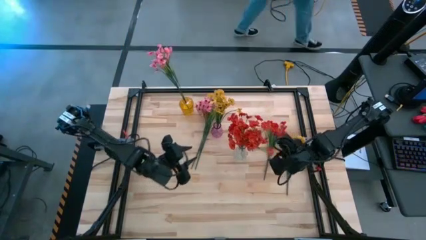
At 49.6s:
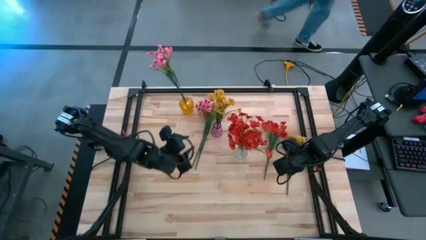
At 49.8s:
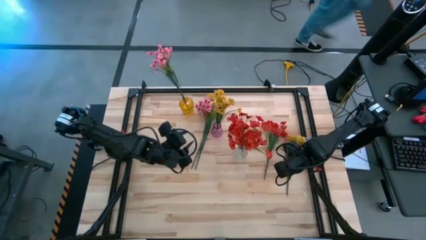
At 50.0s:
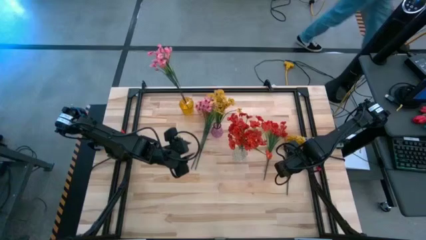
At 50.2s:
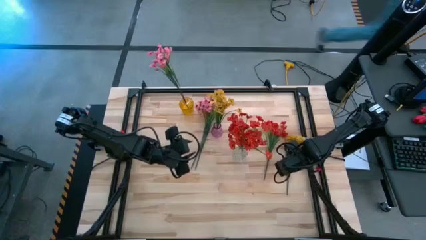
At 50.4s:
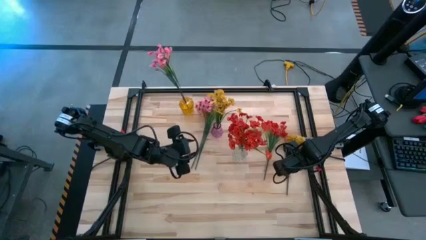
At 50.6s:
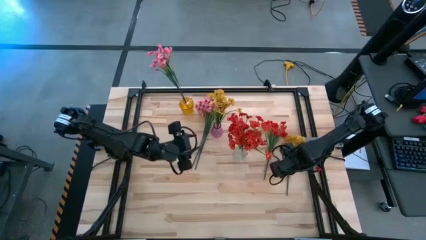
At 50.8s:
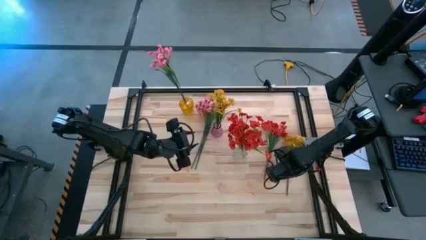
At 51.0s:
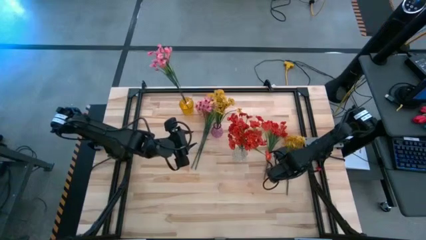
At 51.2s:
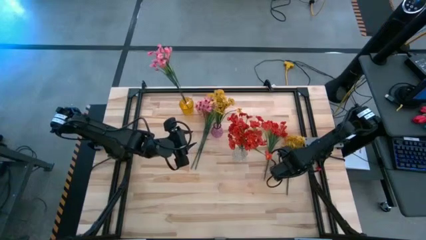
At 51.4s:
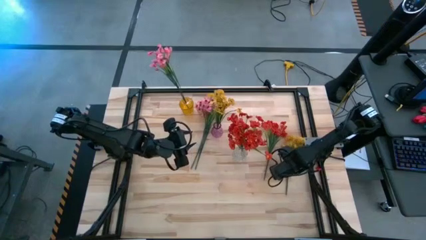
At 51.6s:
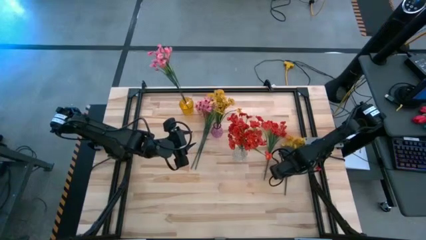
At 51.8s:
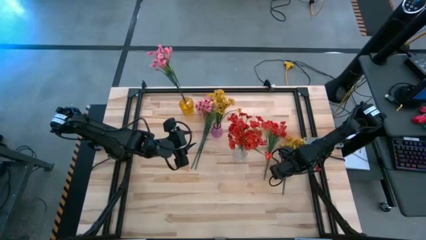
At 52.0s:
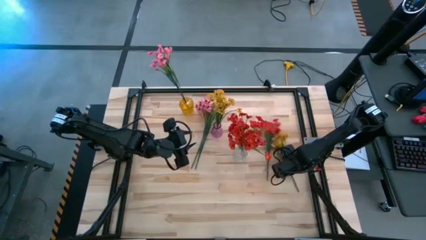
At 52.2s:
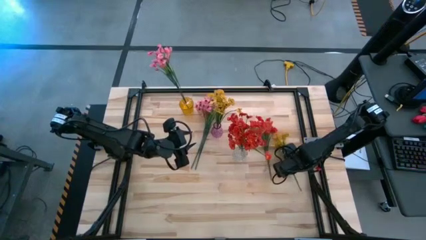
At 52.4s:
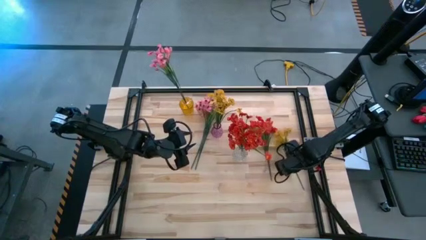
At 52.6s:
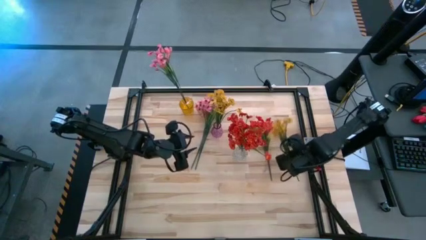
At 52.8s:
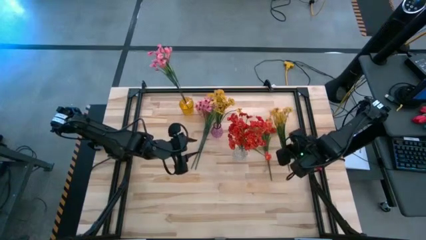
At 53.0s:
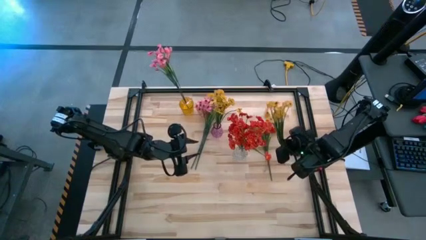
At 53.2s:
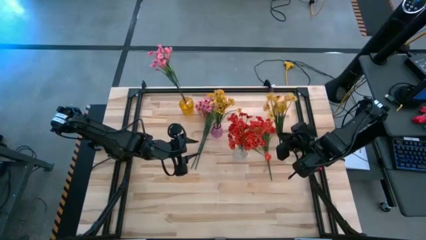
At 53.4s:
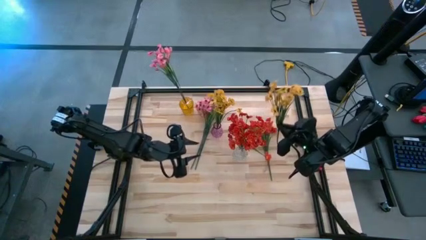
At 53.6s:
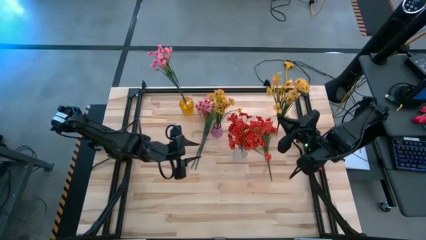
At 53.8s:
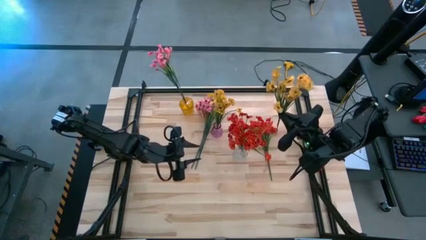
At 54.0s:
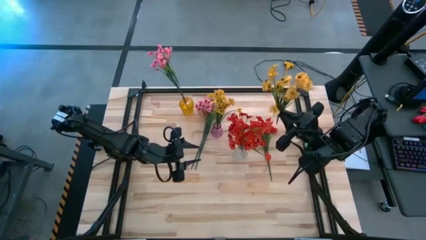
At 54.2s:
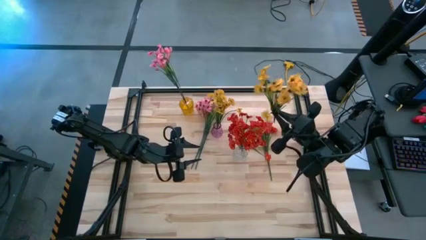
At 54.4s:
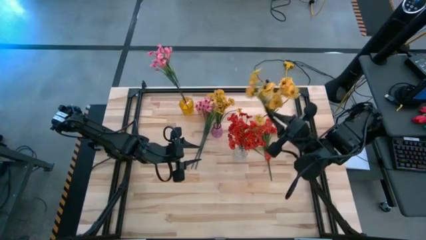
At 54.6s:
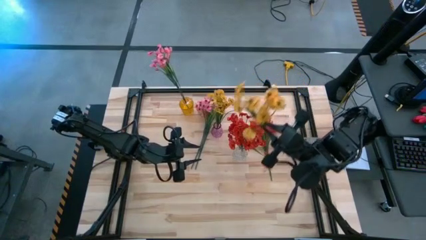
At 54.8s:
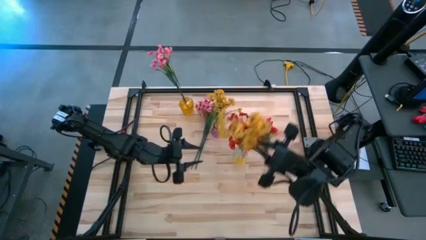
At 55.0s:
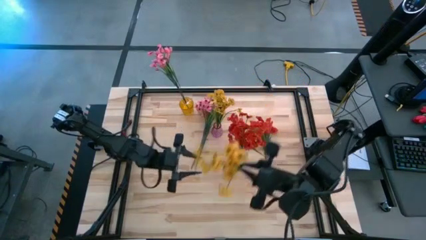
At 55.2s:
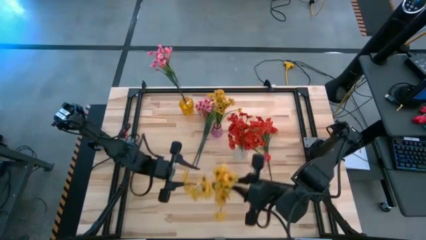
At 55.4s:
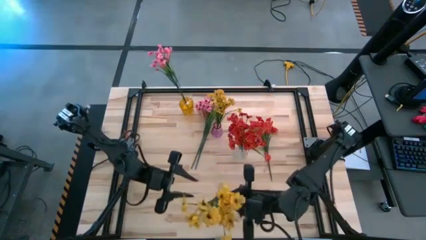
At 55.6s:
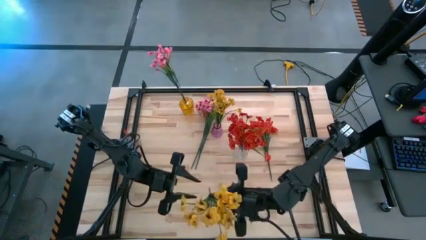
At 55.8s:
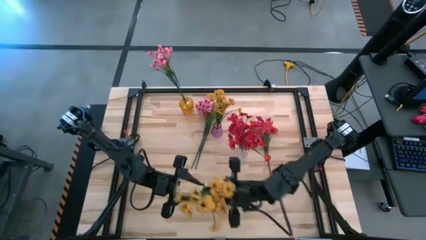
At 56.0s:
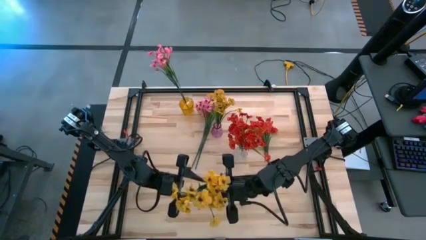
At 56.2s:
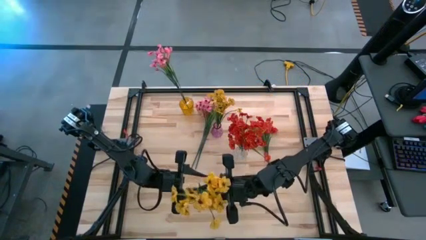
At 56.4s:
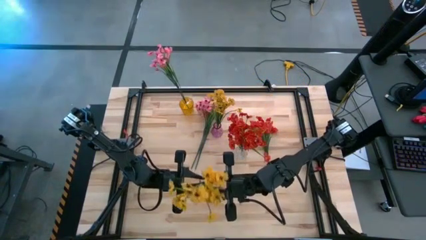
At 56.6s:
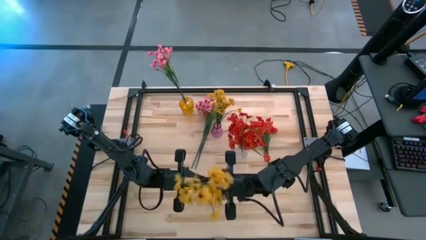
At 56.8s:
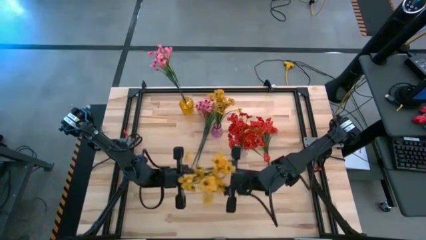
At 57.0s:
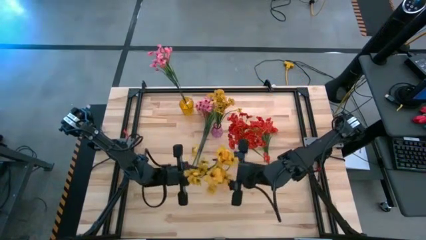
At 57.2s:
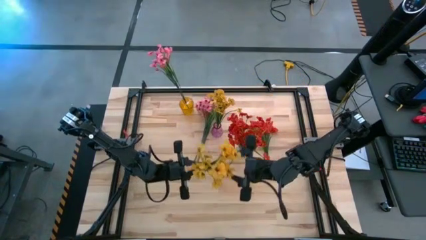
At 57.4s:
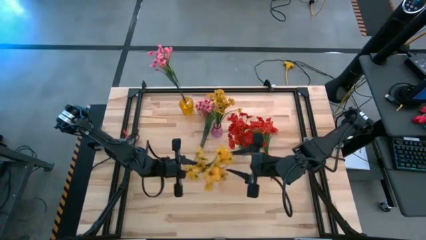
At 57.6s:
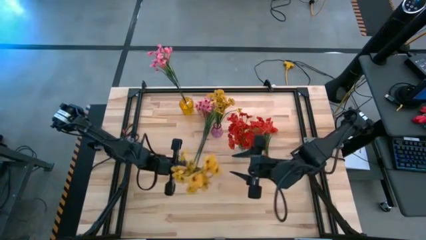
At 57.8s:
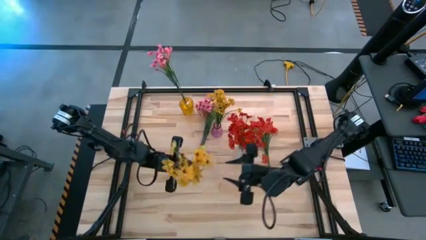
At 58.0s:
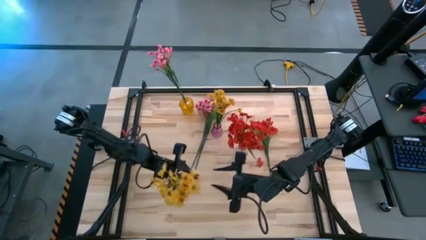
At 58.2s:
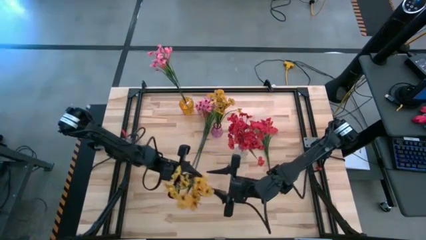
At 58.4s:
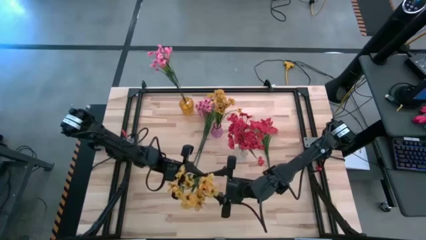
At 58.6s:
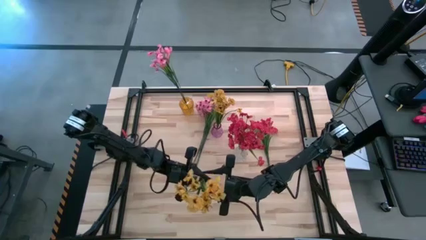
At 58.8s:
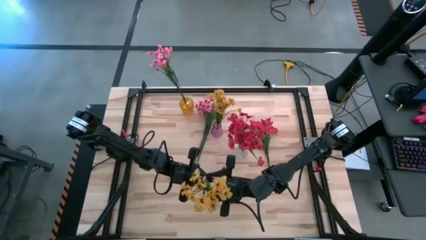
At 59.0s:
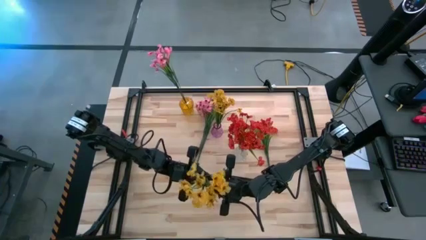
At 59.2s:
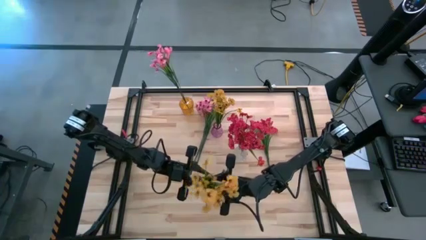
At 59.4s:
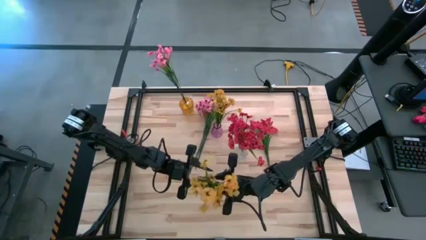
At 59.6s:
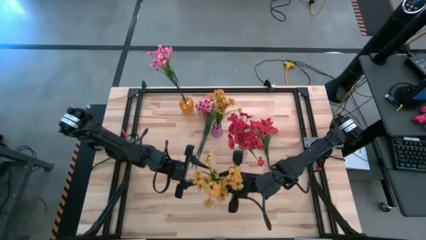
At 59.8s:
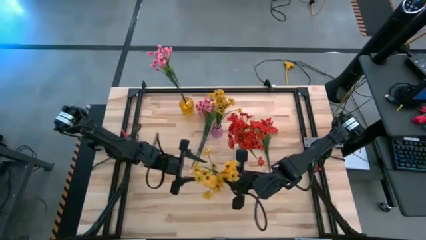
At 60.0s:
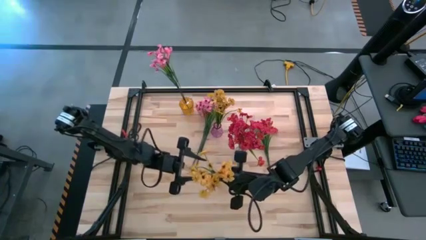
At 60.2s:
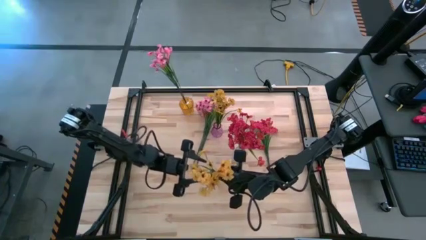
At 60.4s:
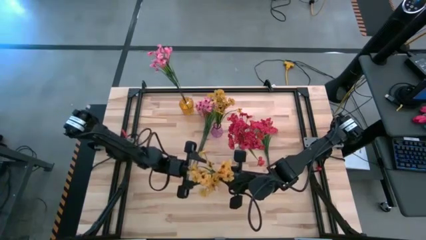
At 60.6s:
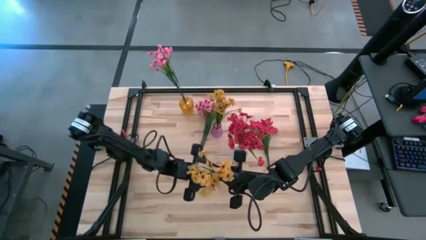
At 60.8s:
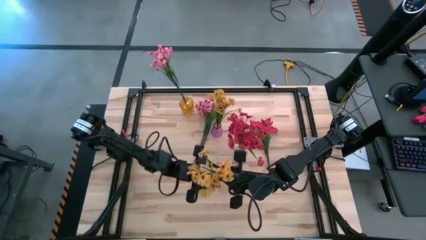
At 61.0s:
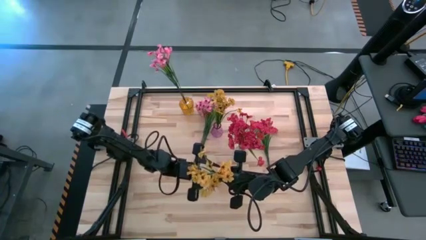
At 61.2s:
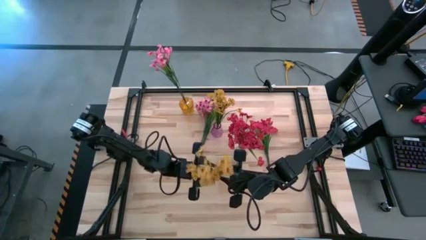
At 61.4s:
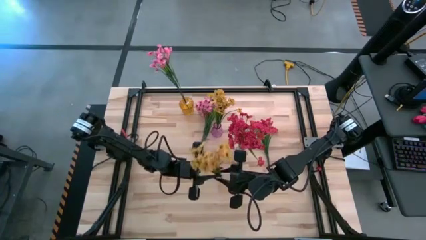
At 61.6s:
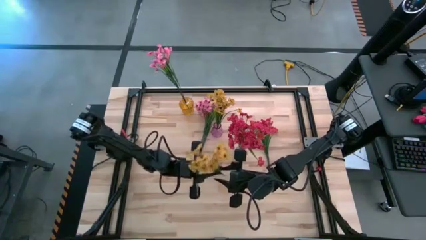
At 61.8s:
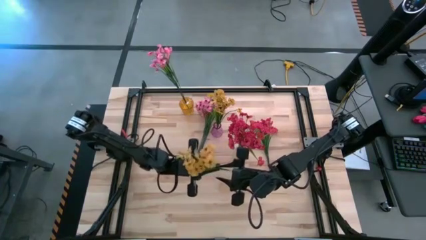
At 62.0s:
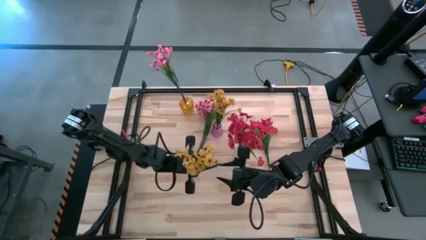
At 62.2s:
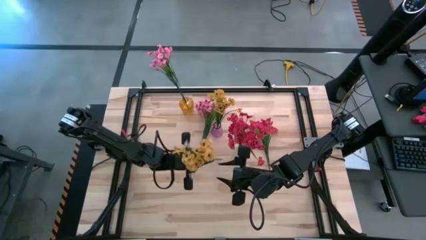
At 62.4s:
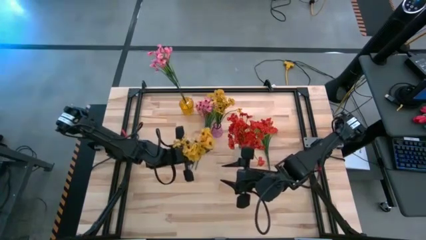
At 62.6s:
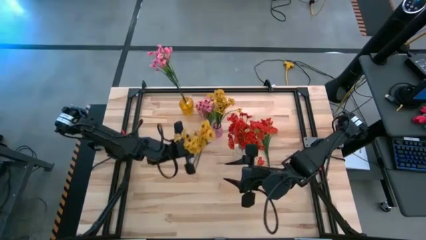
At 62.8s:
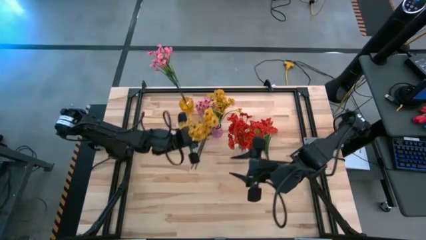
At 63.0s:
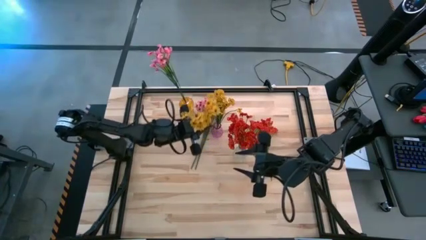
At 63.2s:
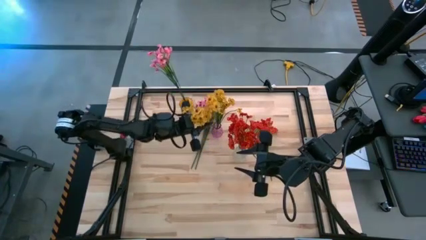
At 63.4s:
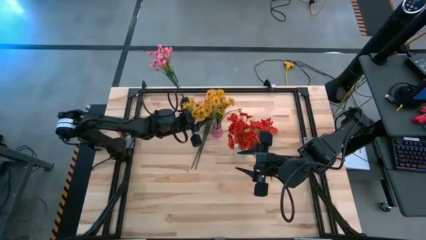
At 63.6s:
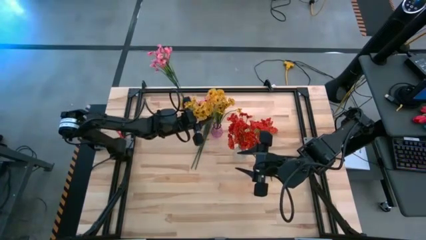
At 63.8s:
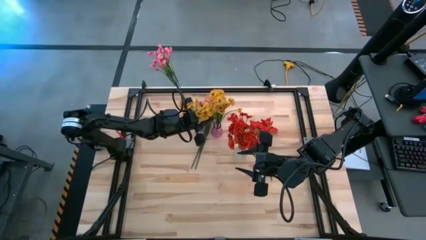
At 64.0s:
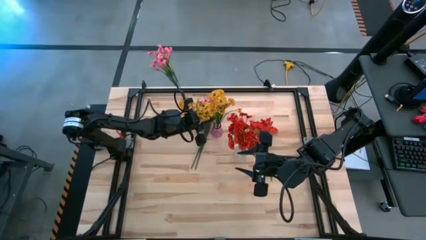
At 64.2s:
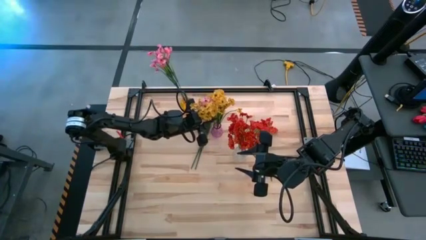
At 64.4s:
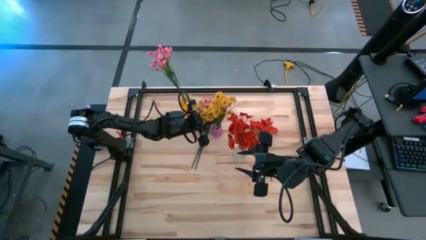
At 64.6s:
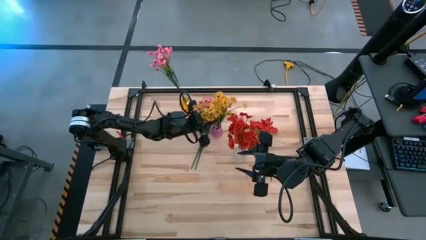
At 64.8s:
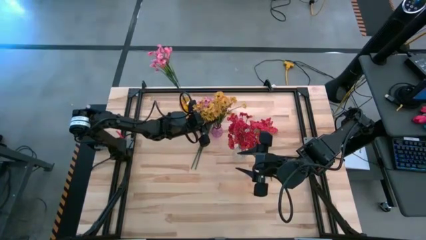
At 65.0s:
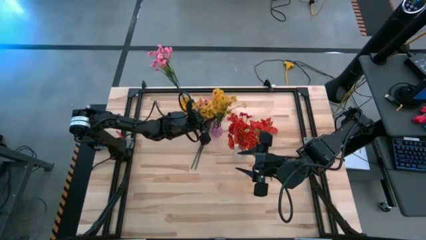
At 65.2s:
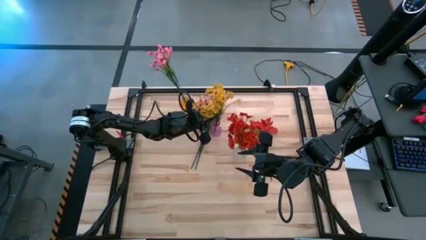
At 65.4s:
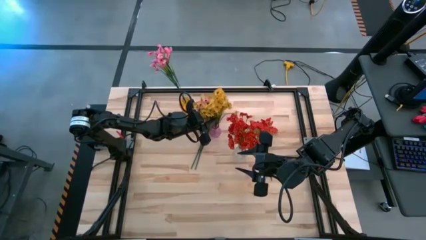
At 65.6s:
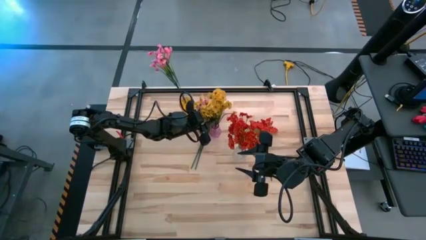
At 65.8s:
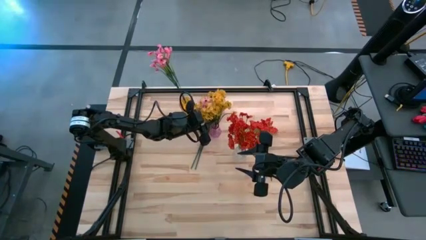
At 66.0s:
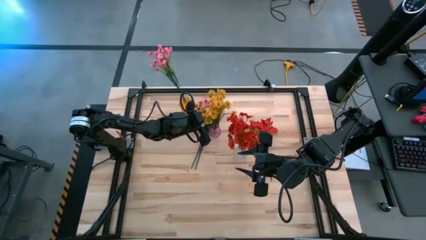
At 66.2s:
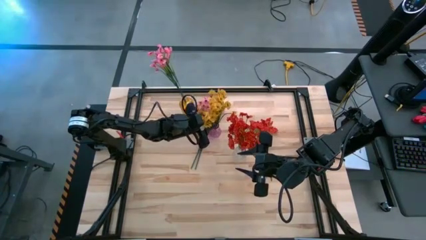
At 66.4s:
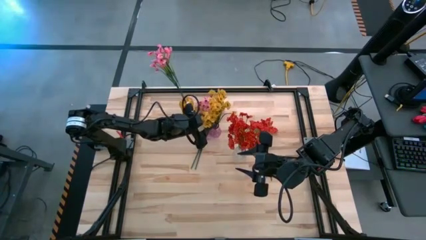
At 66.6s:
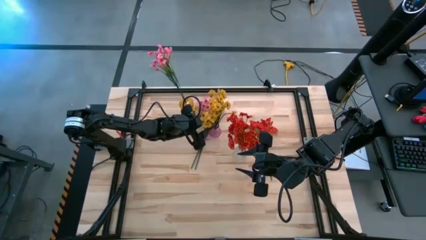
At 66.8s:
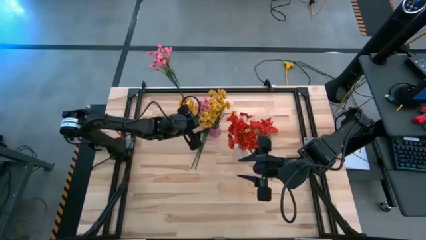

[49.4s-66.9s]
Task: Sort flowers into vase by color
Put the yellow flowers into the violet vase

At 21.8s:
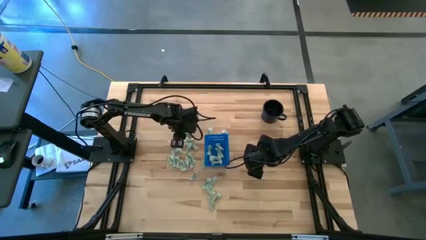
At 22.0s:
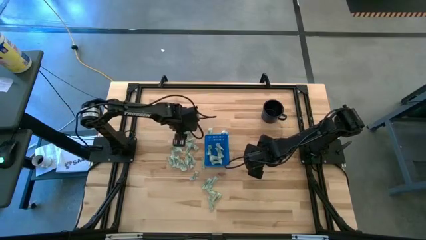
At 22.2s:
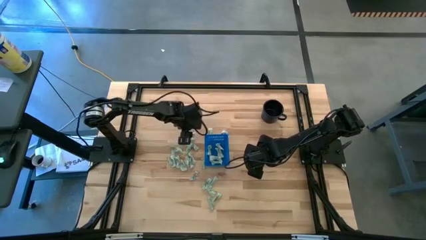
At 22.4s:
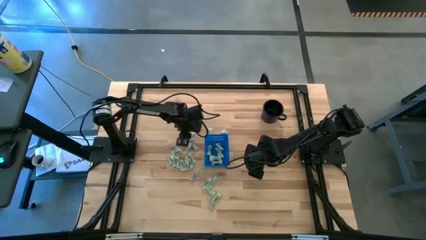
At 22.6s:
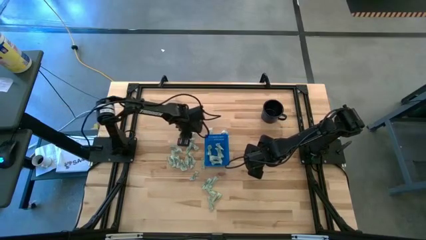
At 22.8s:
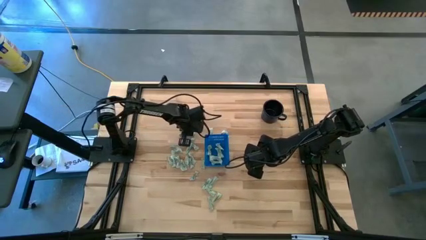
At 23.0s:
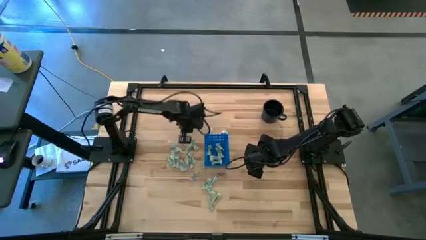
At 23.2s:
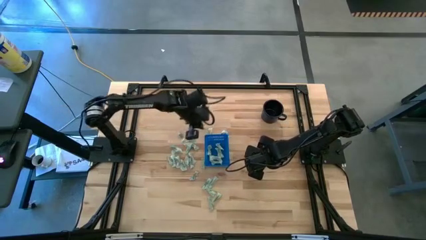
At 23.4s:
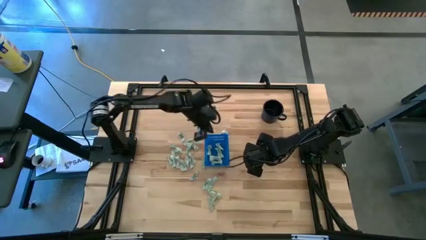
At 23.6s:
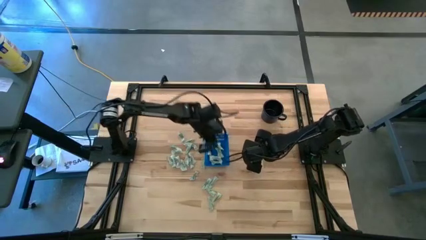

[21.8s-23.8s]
Task: Pick and place Stevia / Truvia into bins
Put the stevia packet into the basket
